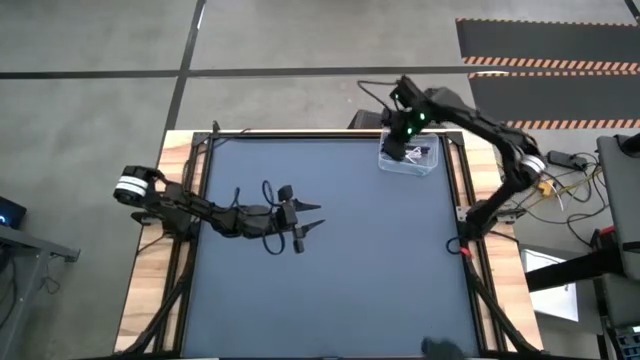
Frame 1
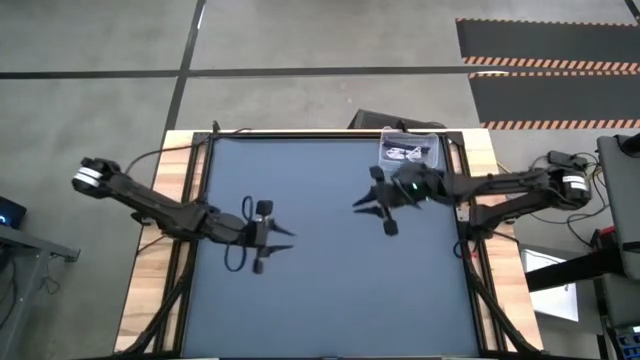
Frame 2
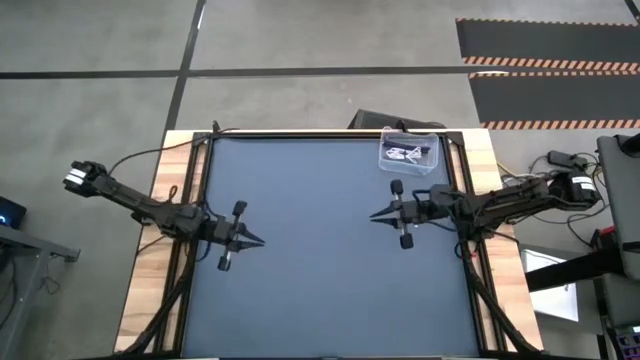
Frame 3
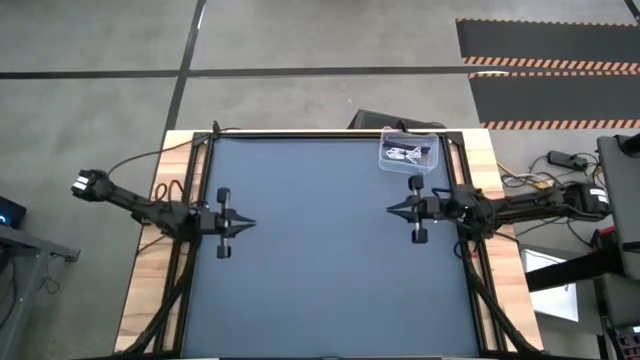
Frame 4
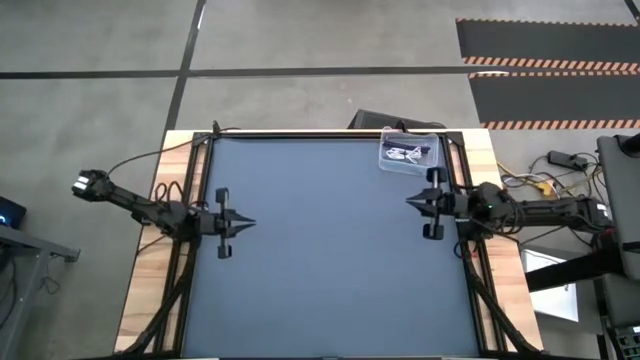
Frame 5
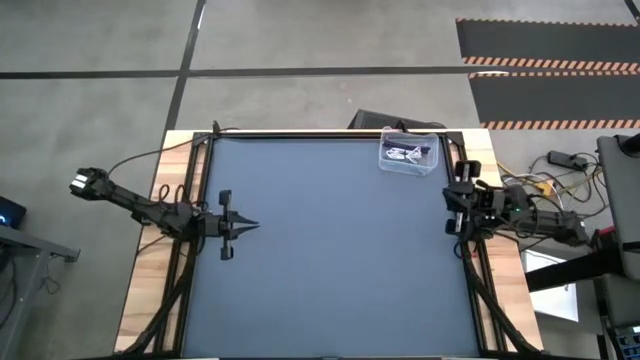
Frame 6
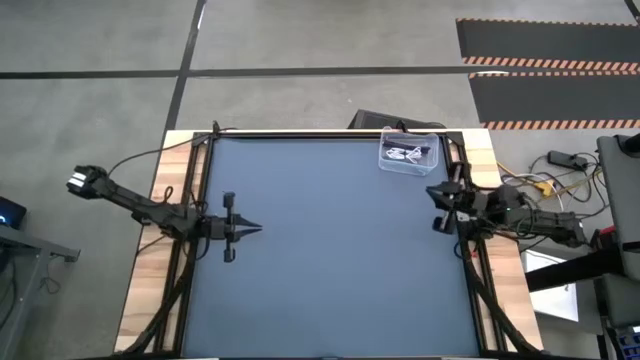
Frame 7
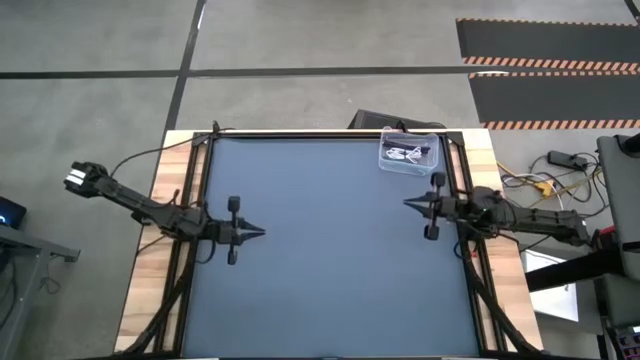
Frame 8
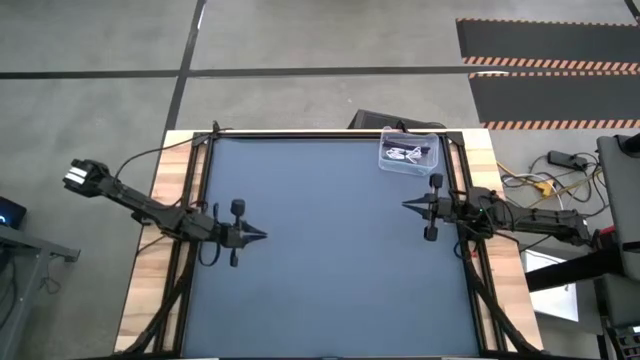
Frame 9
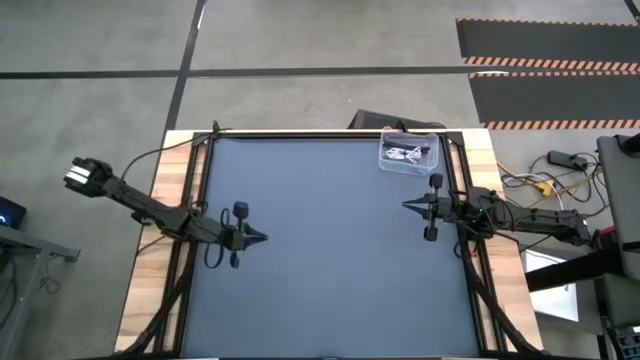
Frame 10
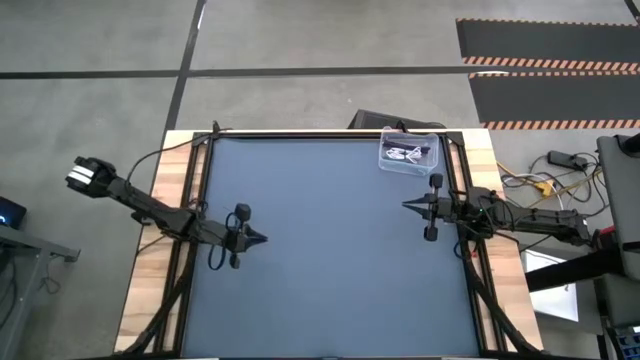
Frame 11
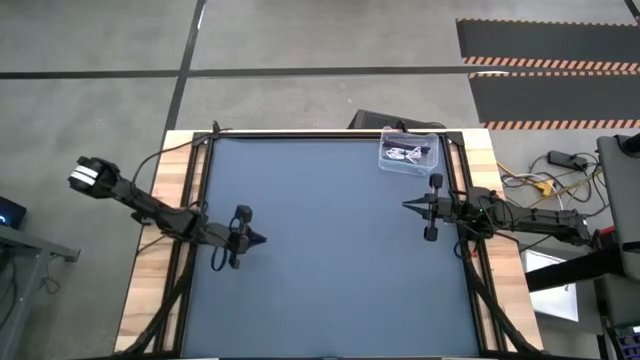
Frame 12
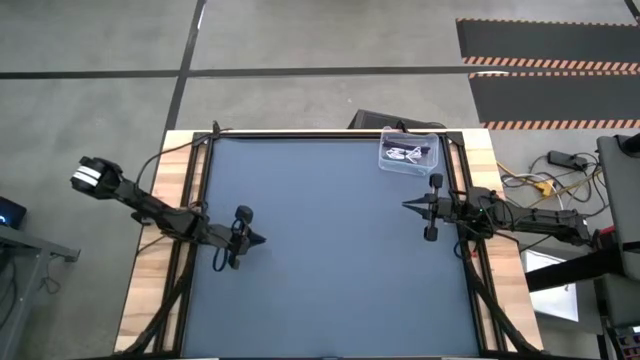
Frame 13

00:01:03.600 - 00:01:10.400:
Task: Pick and place USB-C Cables
Return to Home Position

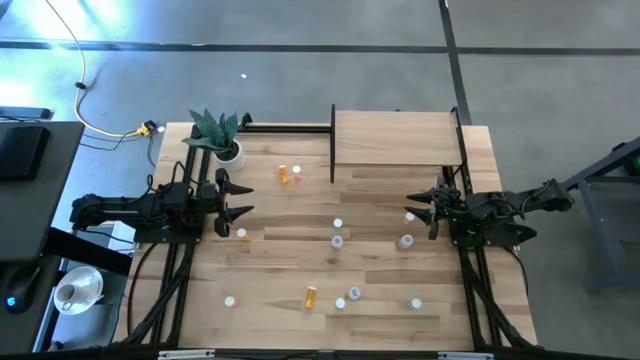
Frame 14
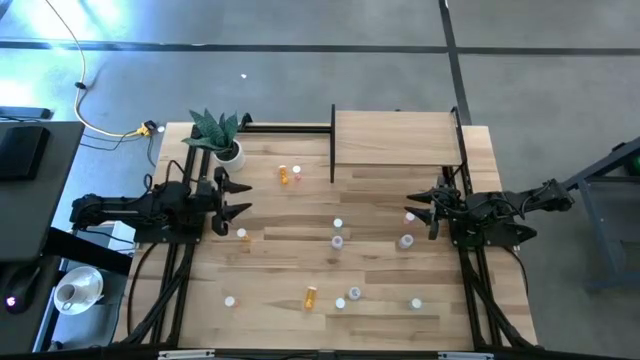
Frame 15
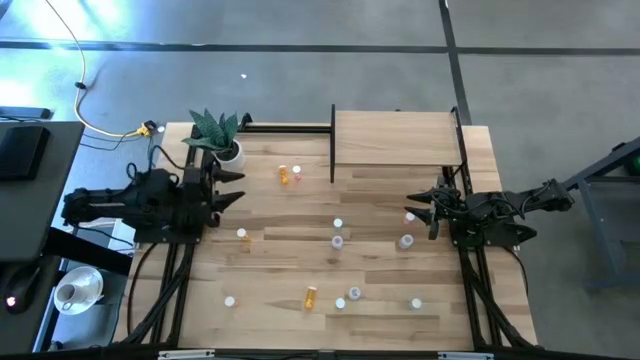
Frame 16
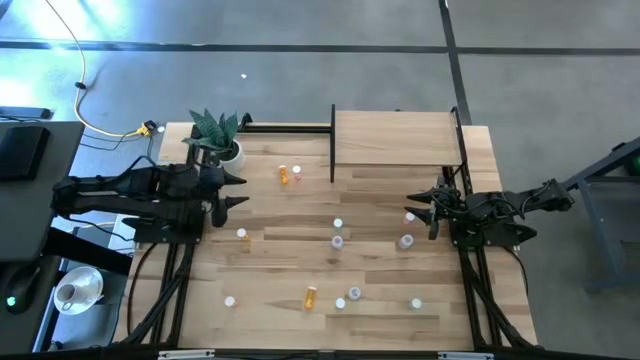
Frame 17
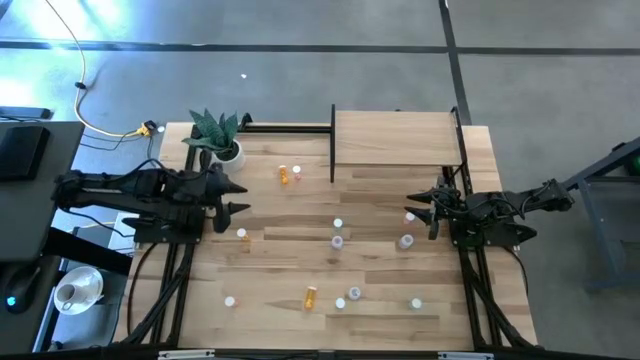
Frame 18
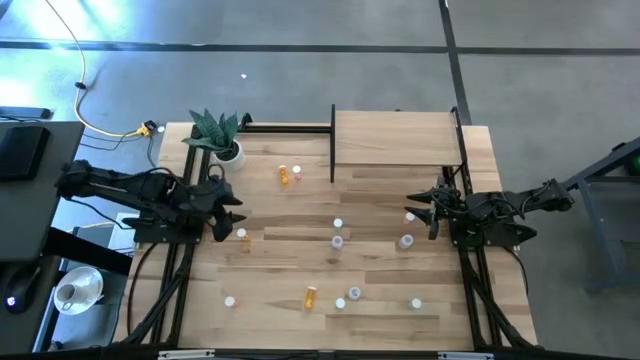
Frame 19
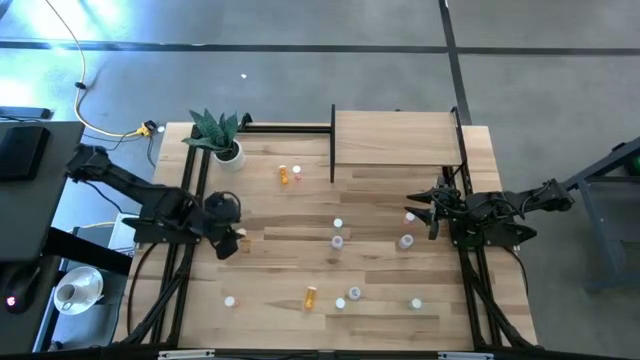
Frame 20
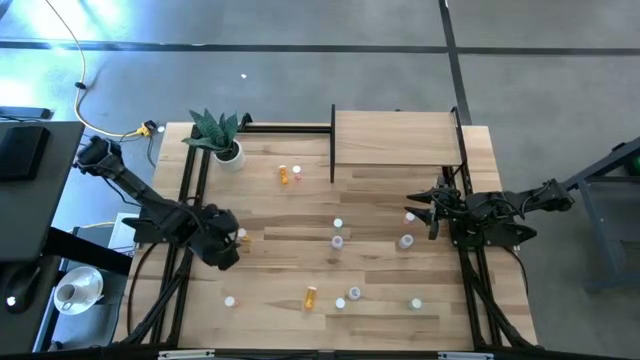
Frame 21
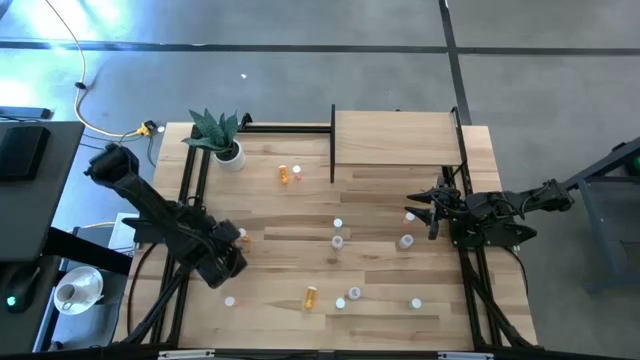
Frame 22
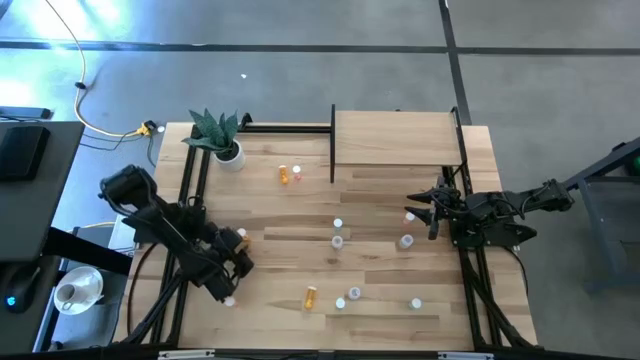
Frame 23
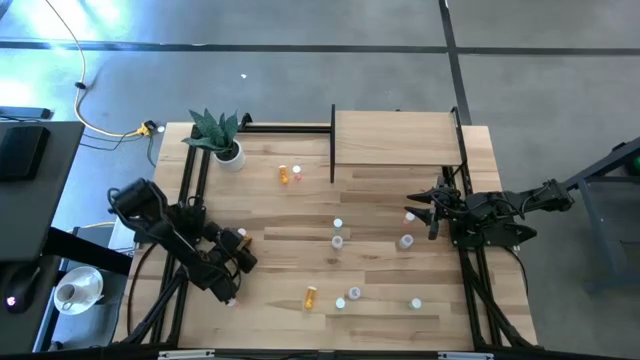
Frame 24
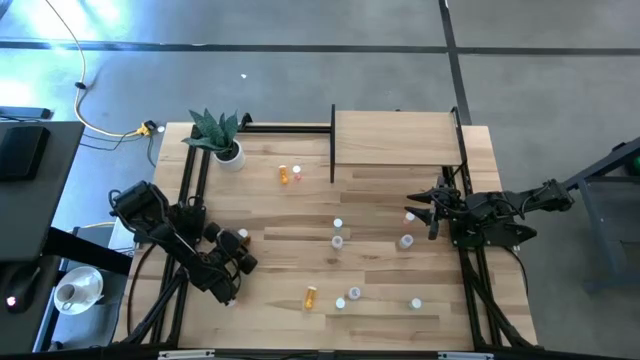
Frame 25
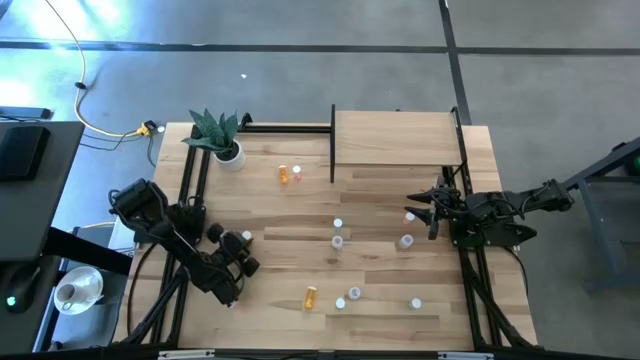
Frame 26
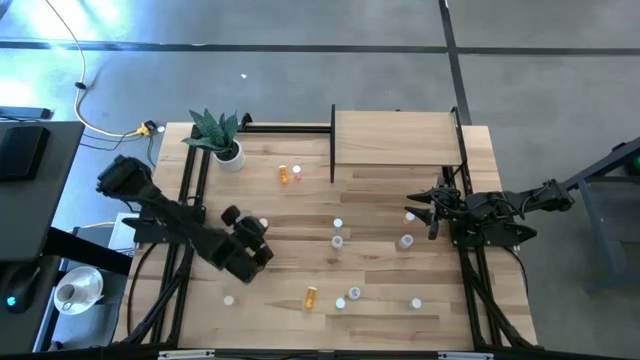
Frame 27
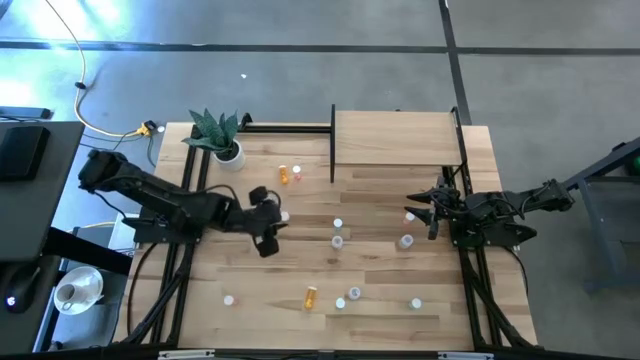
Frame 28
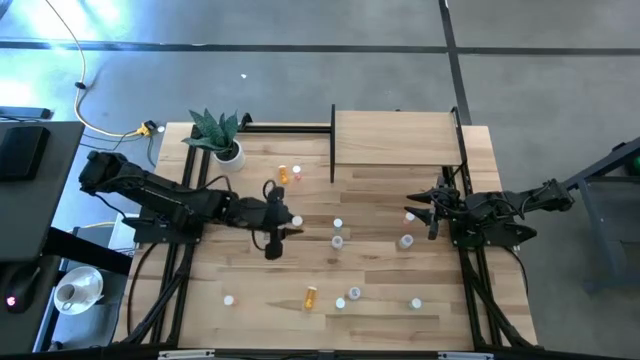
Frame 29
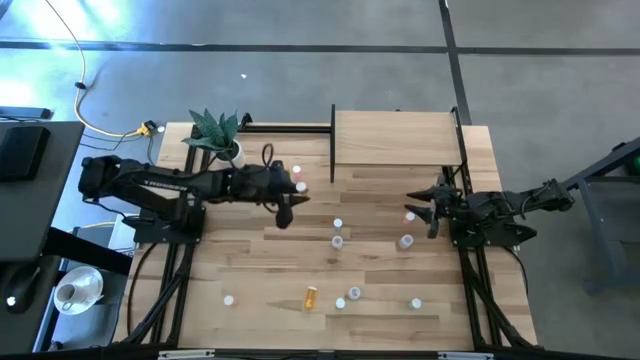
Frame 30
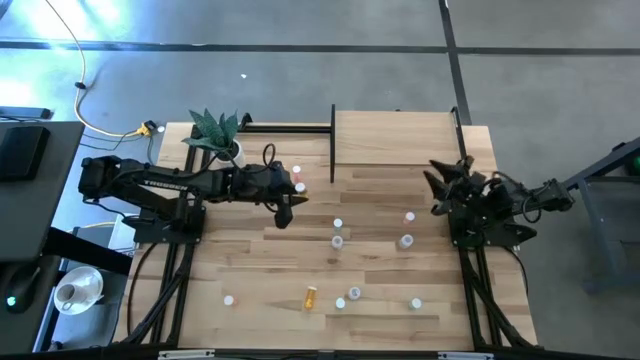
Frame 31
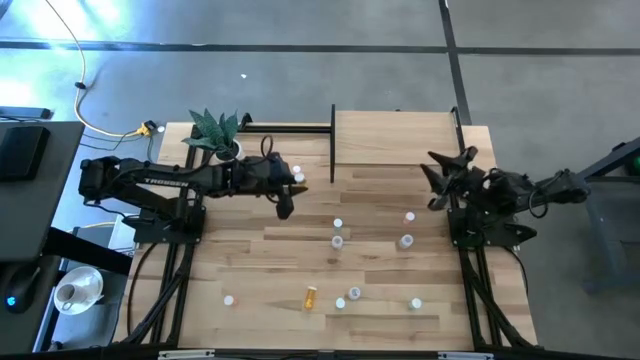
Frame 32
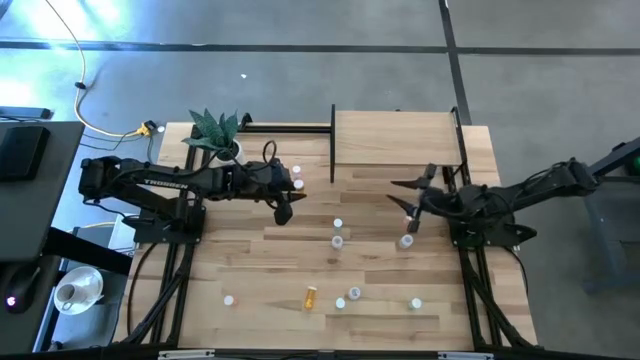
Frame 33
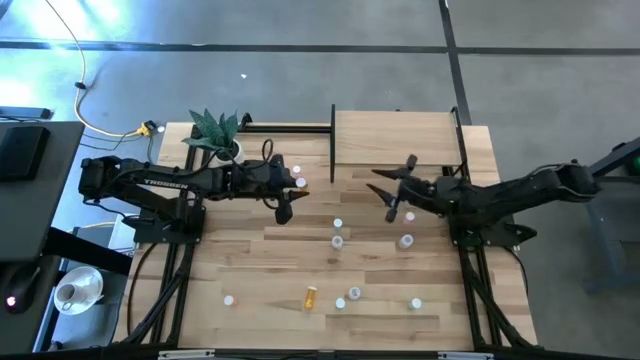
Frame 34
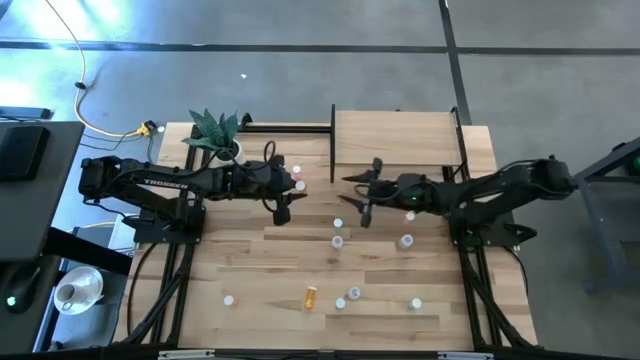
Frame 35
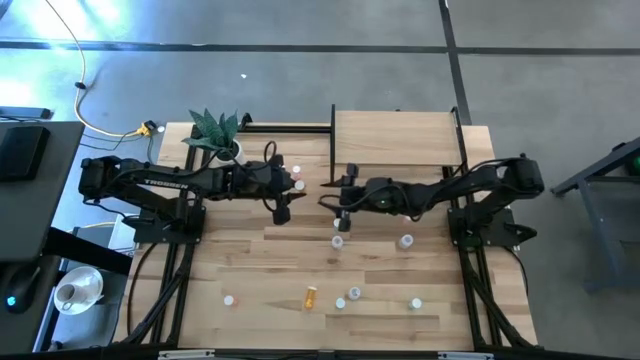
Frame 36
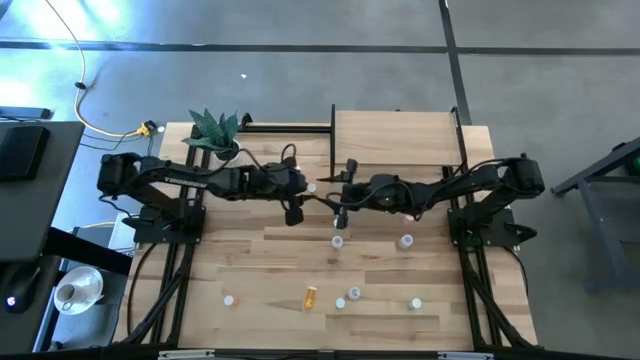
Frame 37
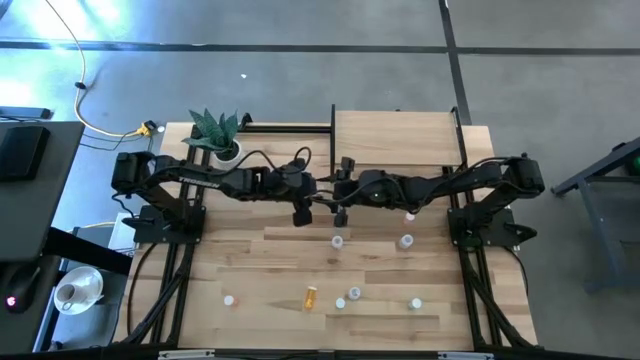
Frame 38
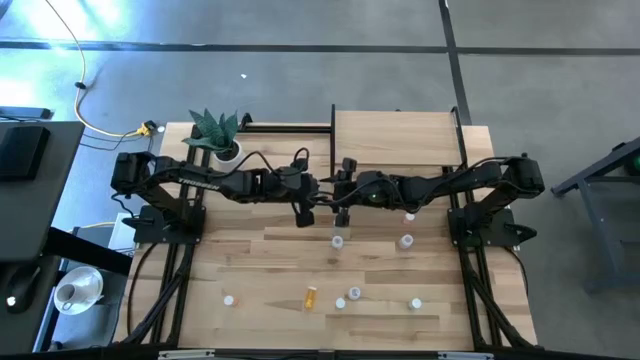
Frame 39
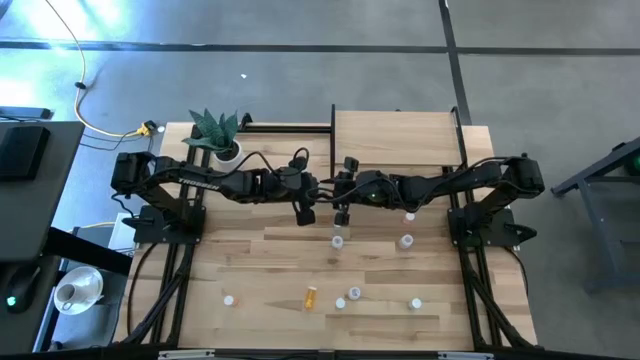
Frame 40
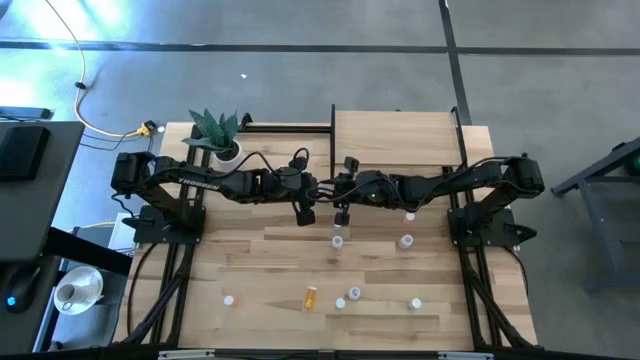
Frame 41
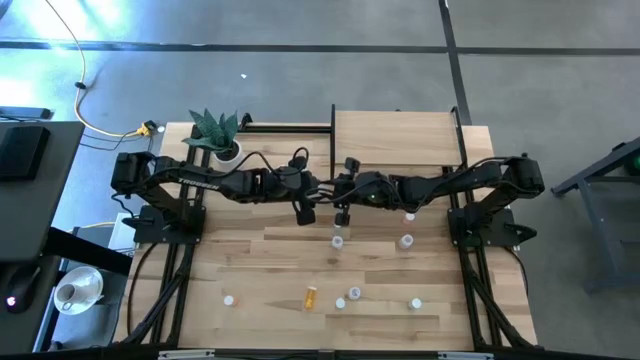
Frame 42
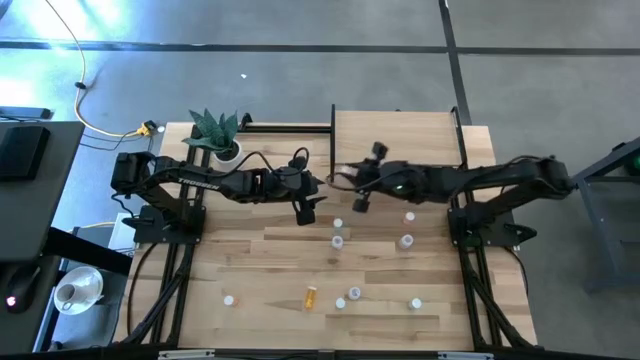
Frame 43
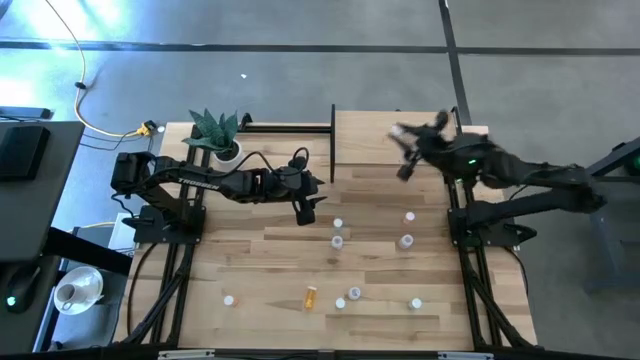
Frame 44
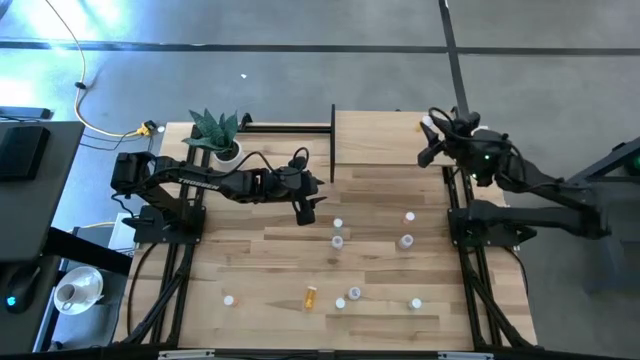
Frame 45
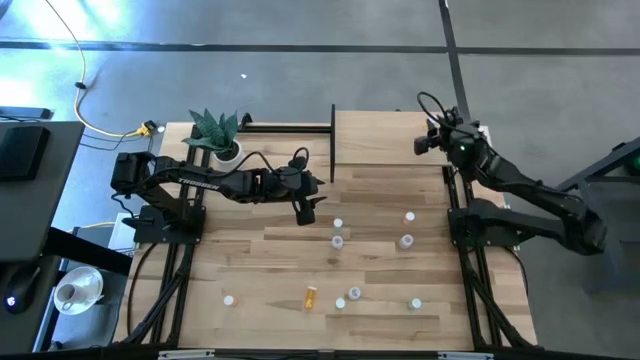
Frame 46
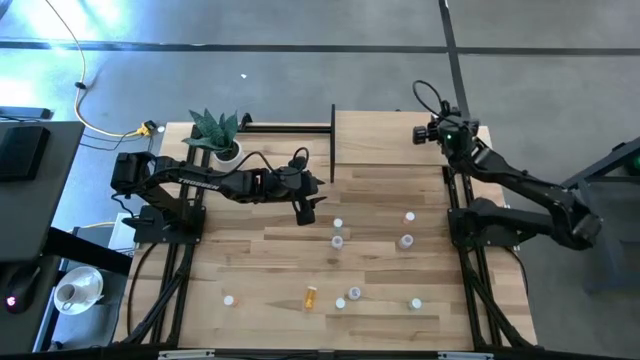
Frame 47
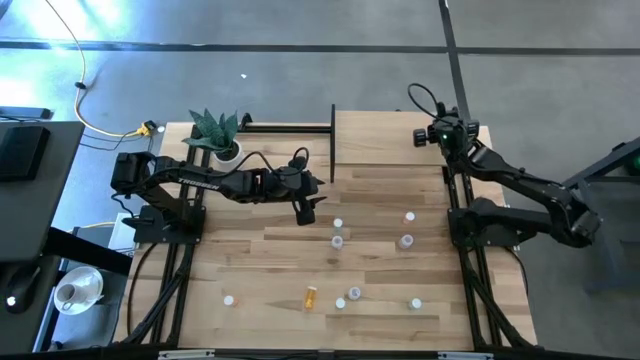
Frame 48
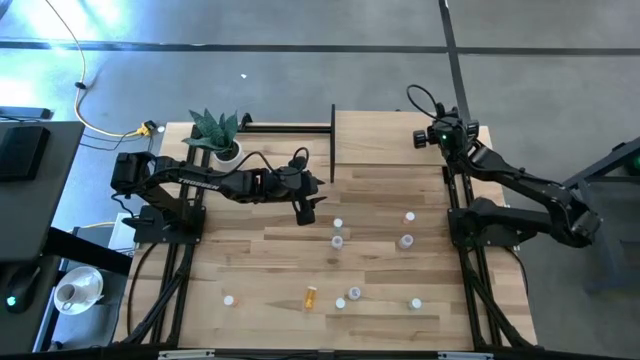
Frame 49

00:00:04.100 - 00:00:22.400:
Task: Pick and place medicine bottles onto shelf by color
Put the left yellow pill bottle on the shelf
